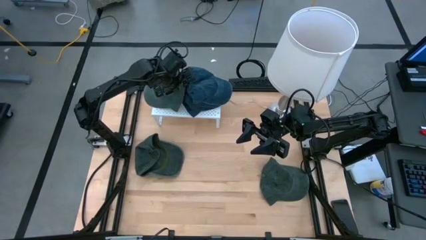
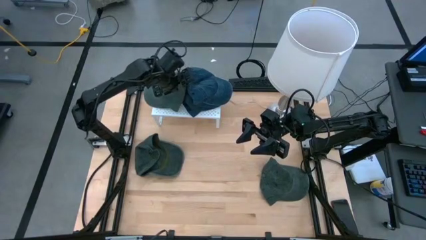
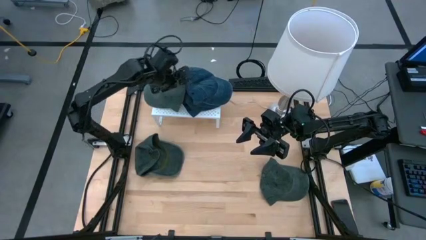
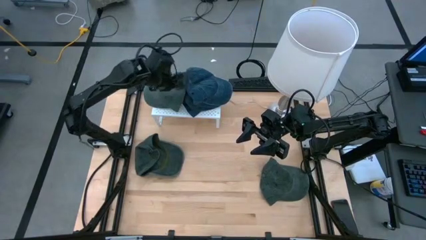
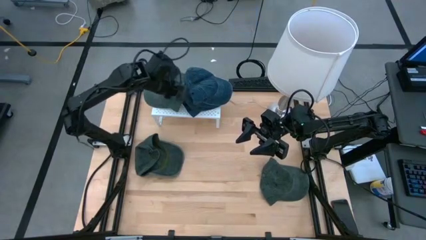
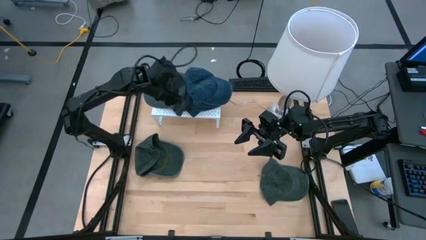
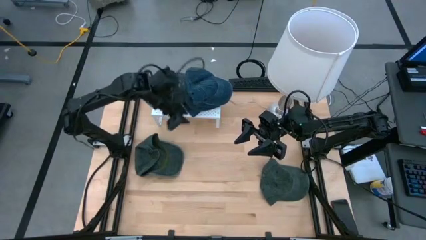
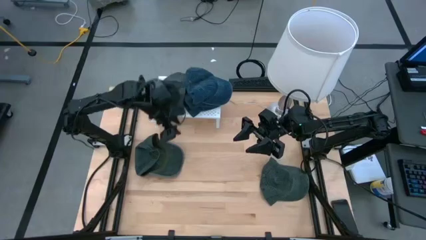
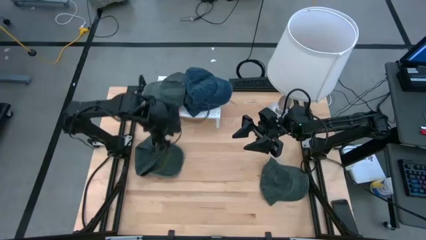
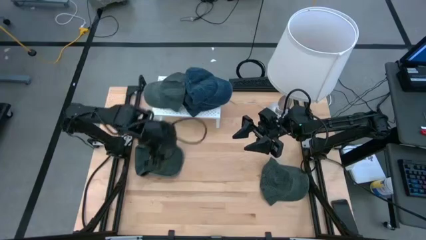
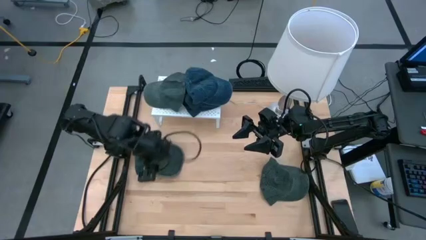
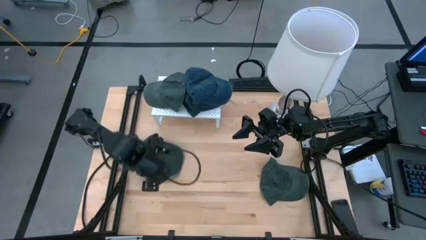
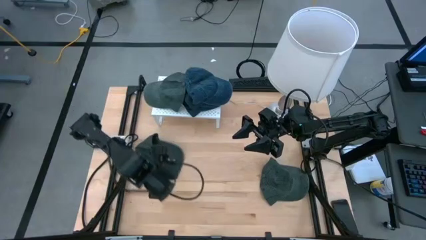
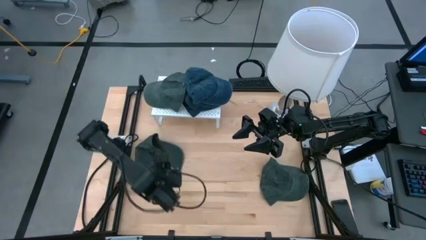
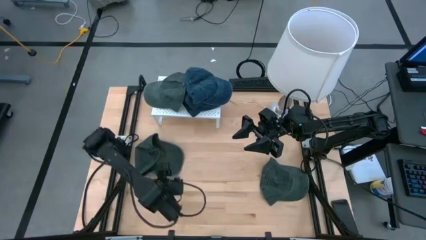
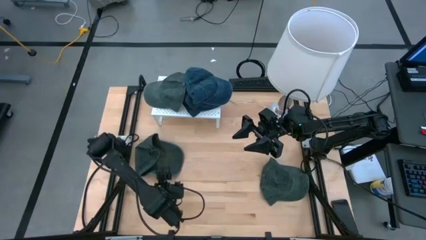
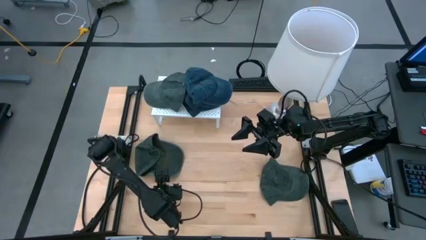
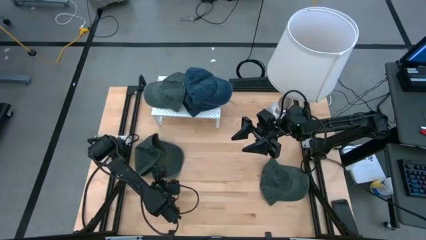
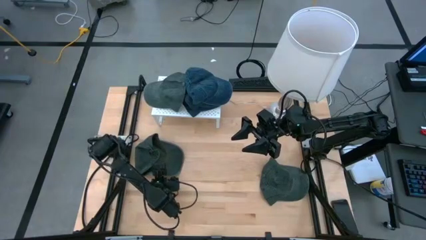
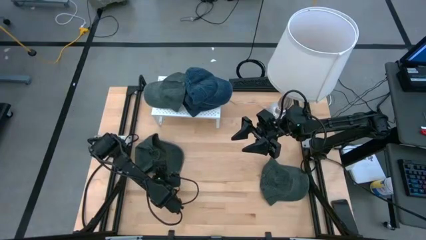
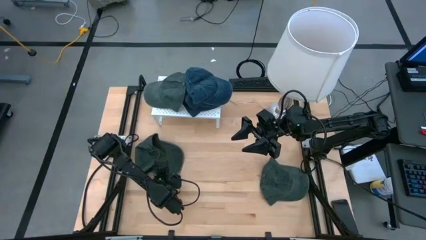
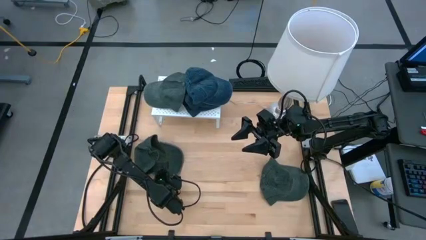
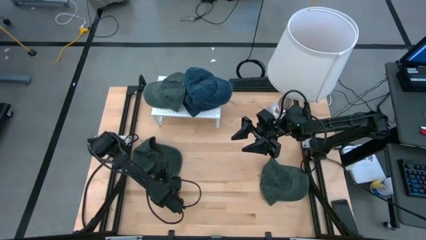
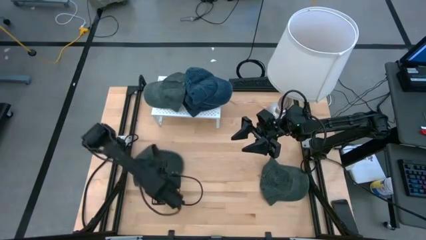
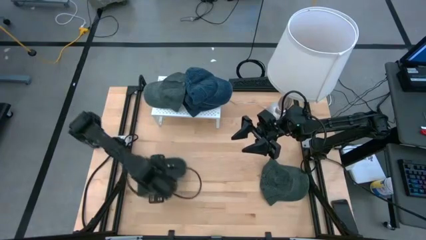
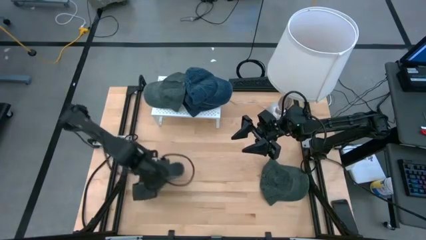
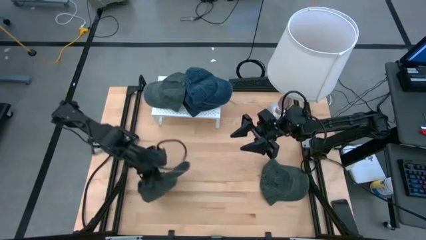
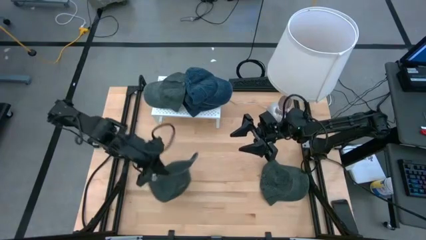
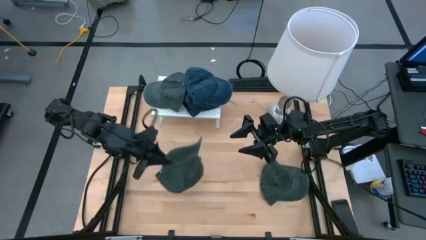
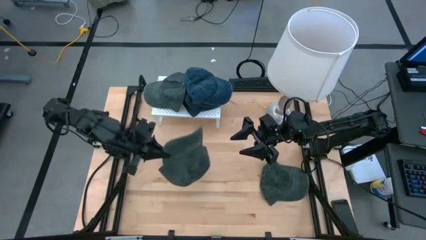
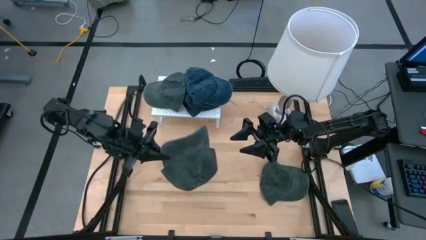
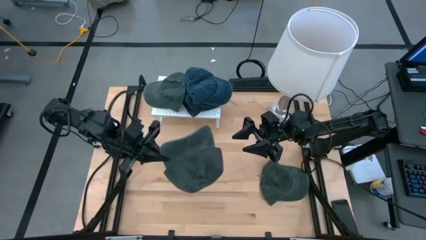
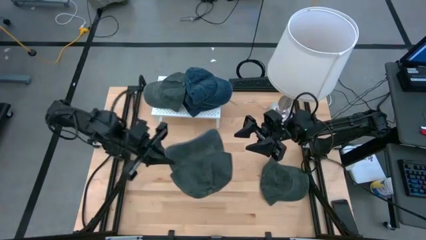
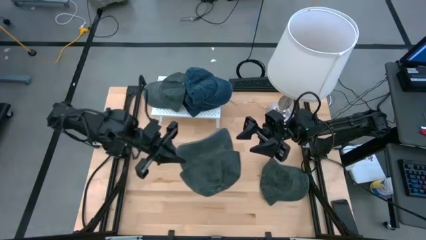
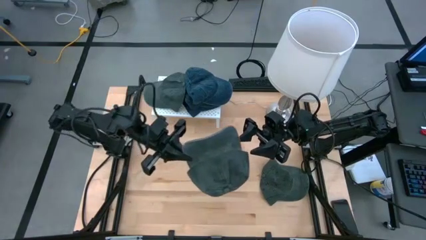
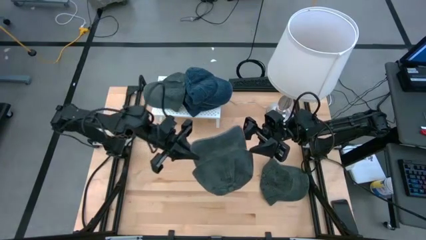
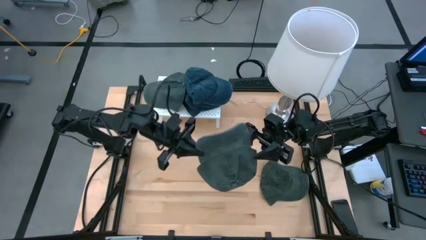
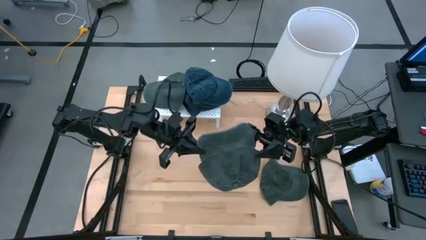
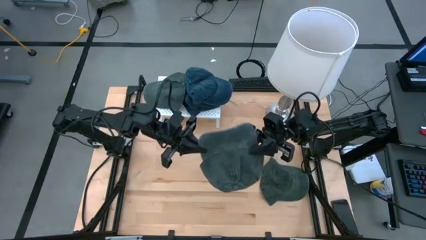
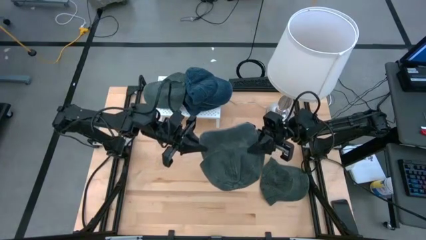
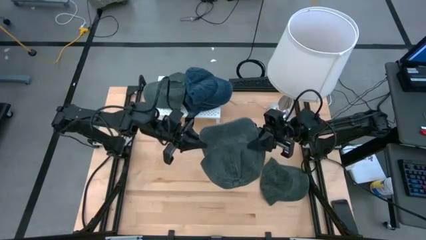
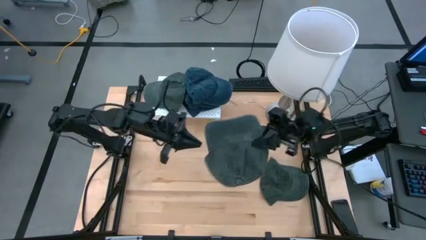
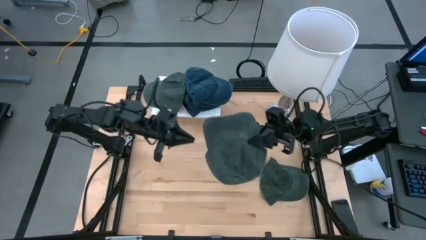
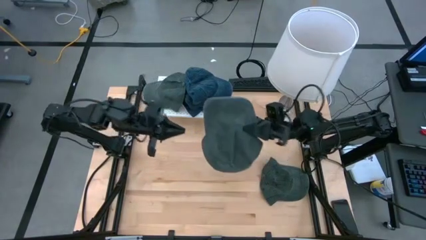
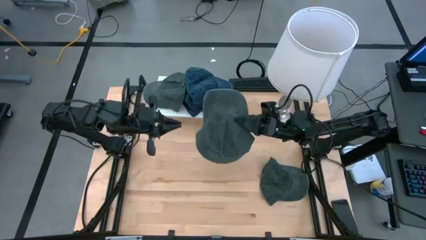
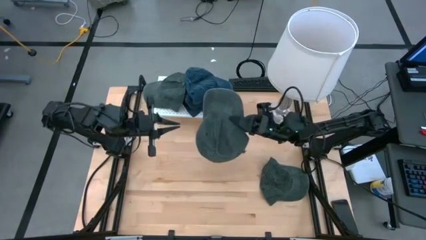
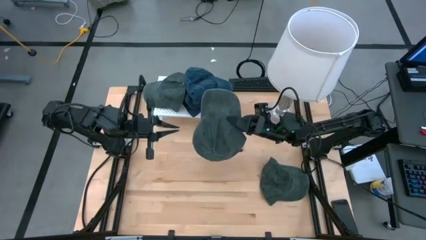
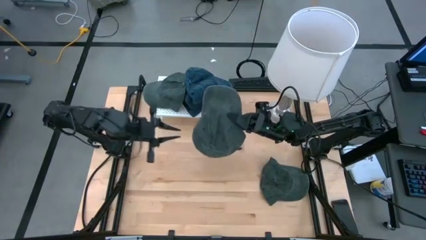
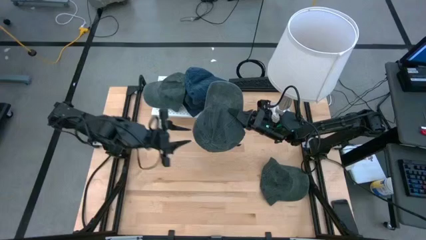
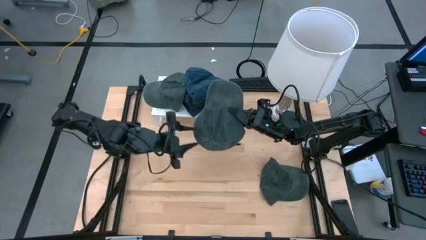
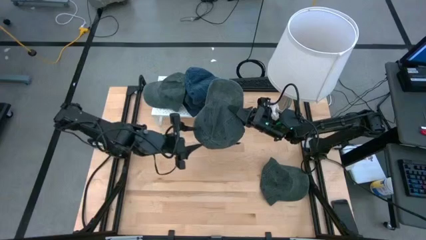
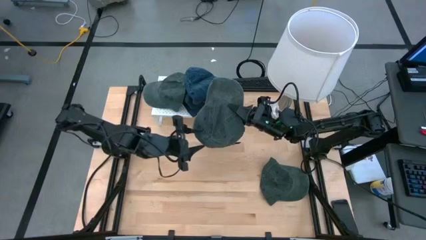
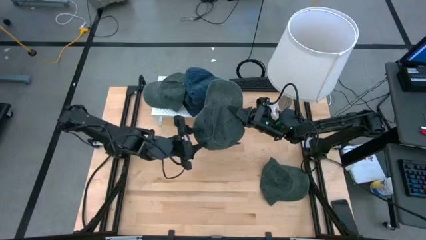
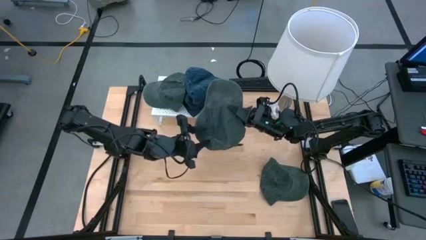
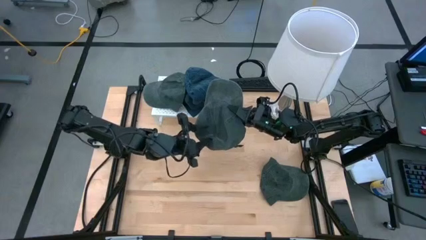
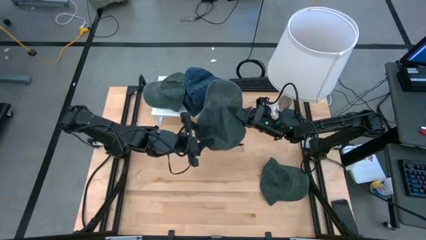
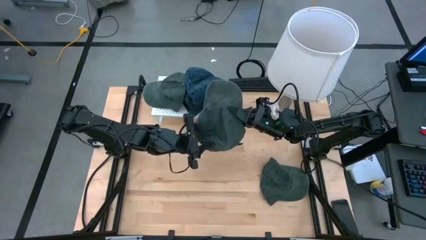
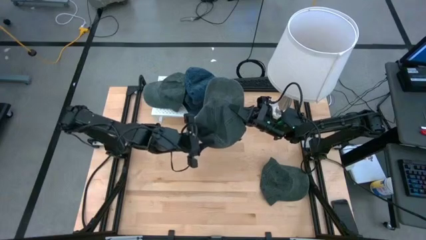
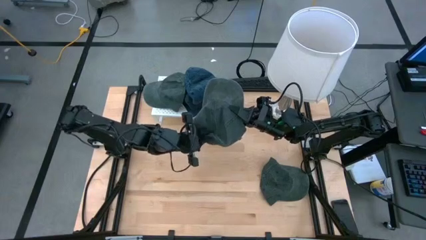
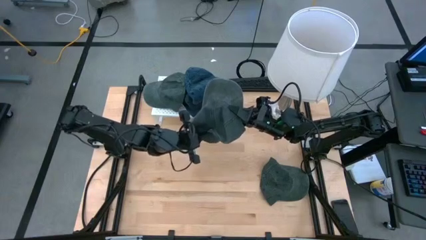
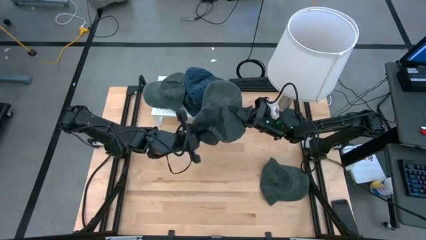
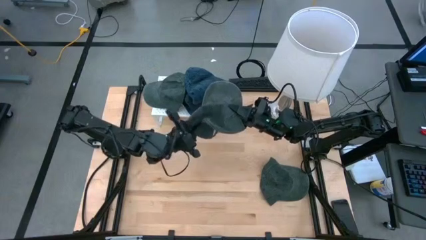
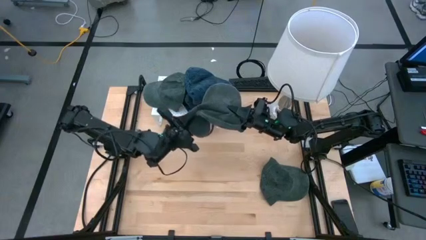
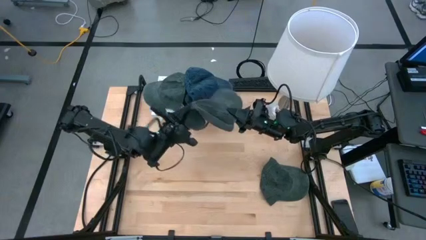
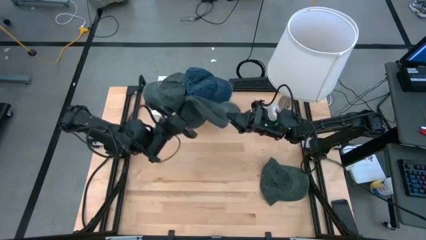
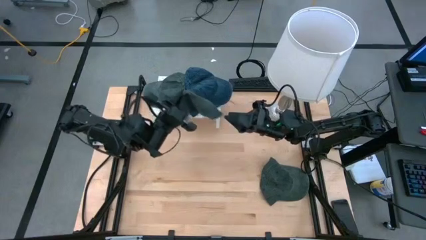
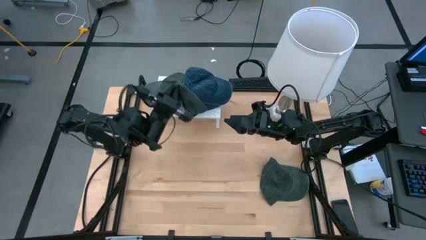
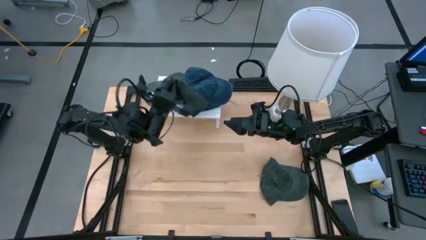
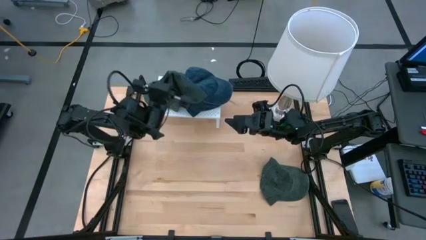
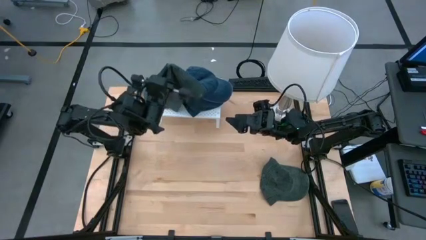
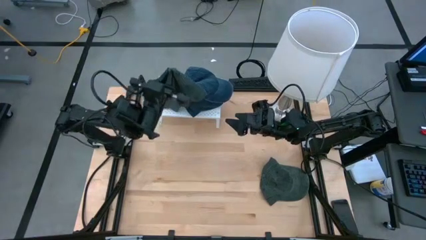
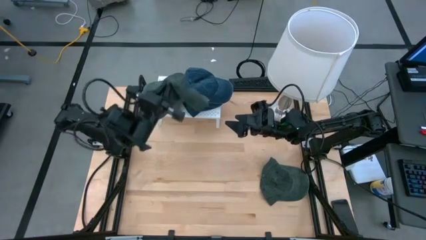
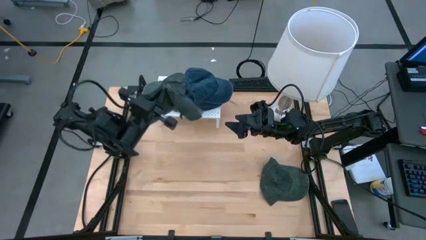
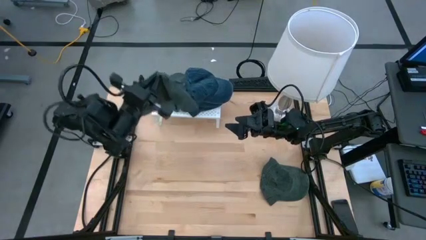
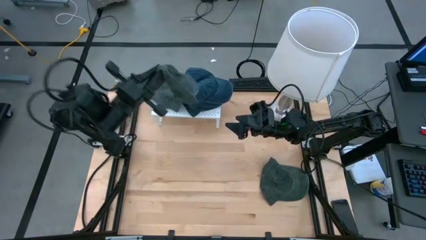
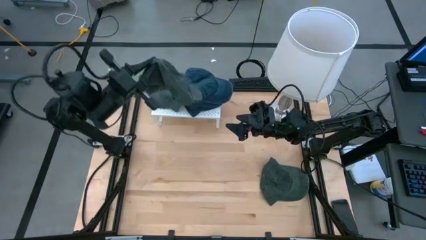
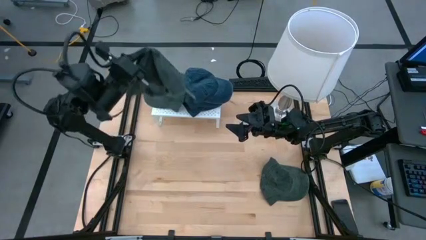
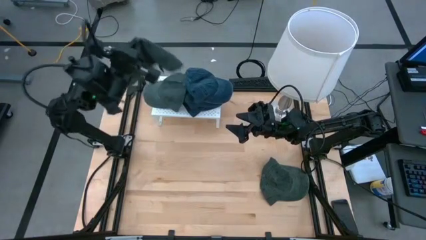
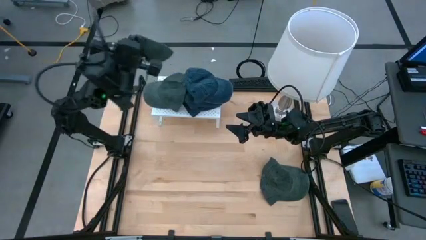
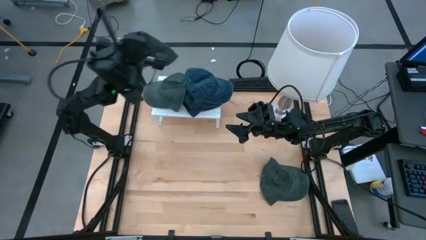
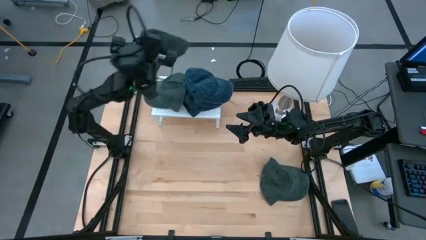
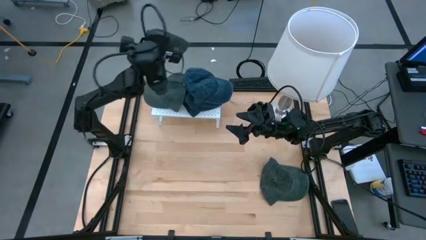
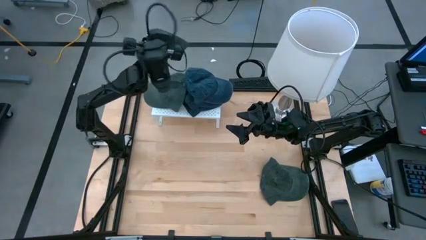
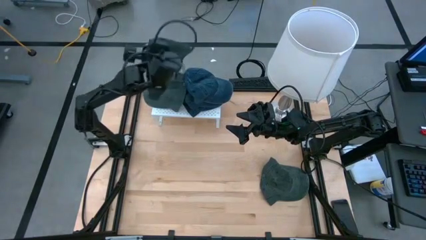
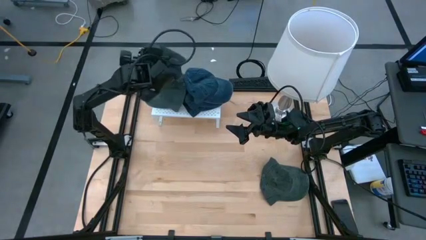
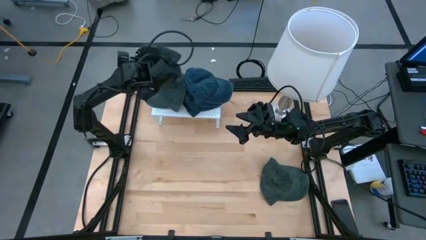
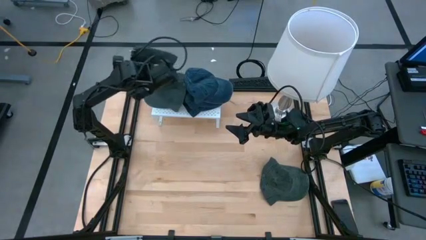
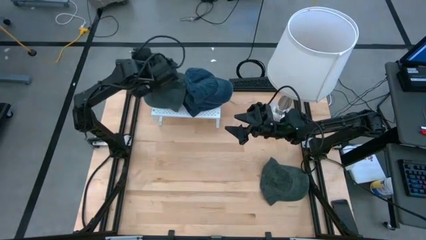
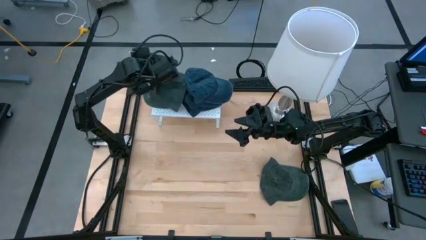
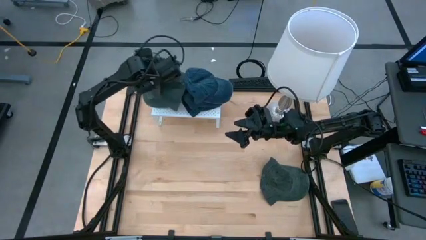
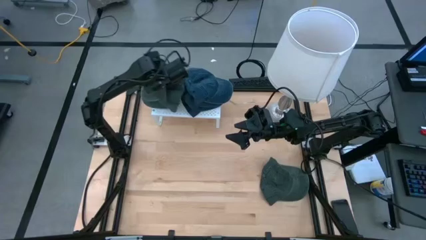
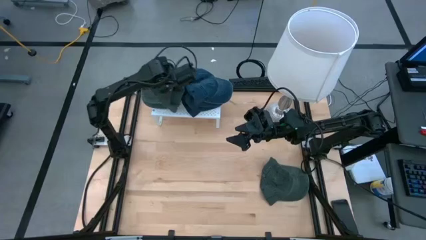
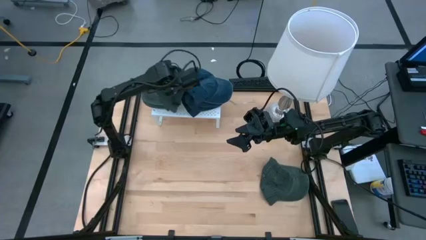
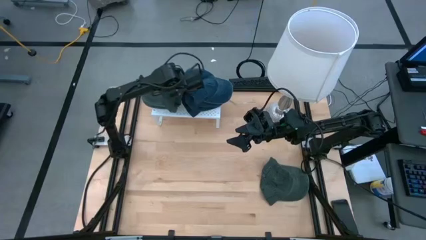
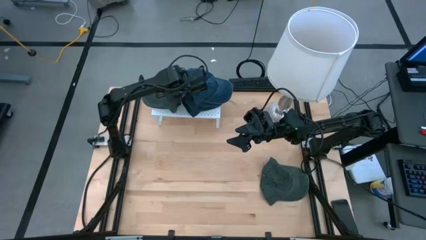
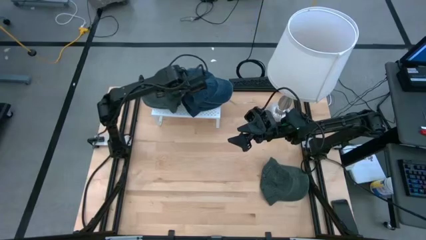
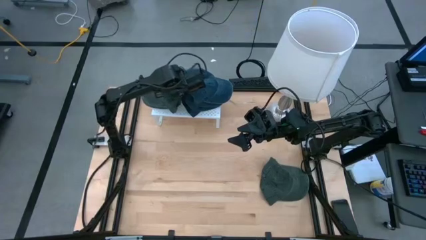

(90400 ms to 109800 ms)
Task: Pick & Place hat
Stack the left gray cap on the gray cap on the shelf
